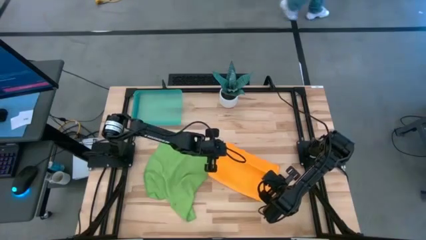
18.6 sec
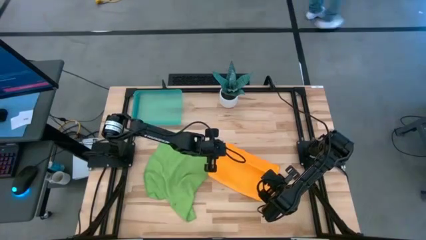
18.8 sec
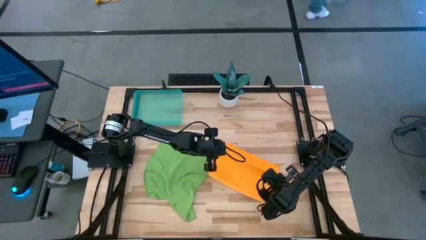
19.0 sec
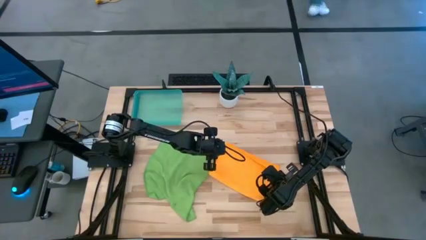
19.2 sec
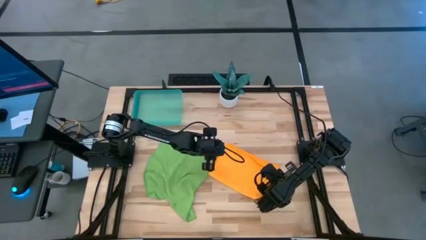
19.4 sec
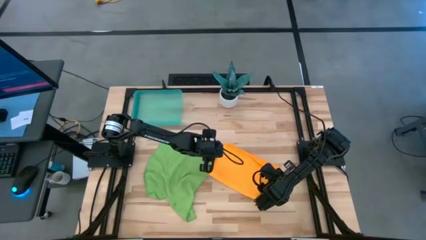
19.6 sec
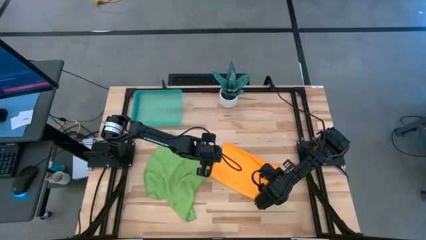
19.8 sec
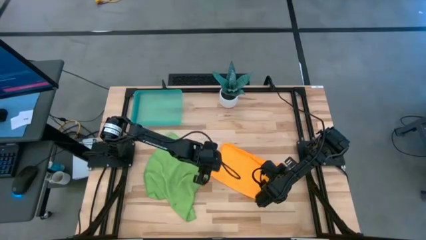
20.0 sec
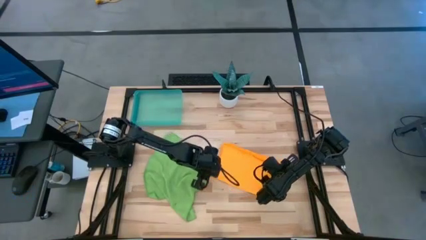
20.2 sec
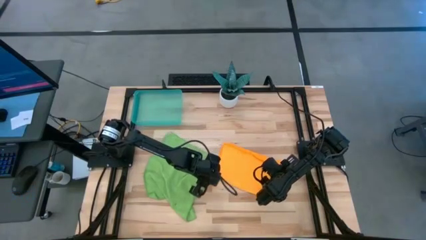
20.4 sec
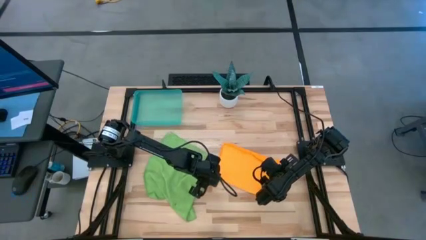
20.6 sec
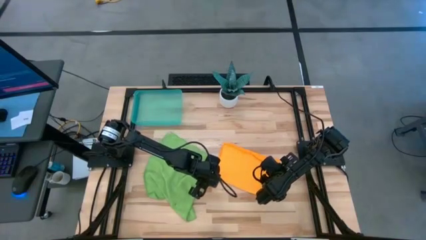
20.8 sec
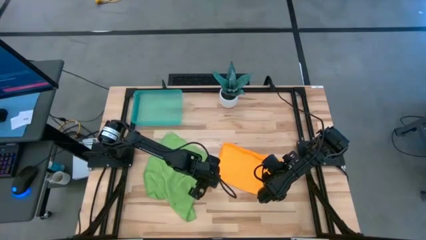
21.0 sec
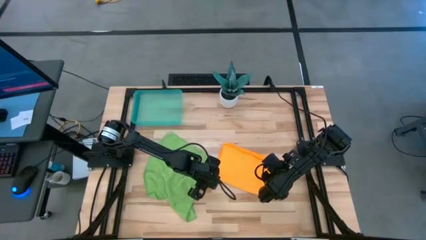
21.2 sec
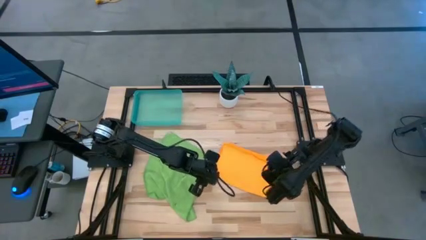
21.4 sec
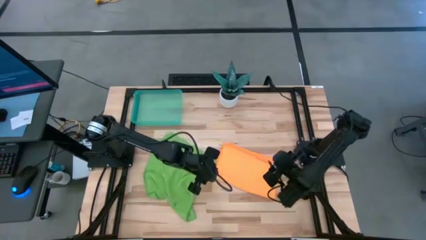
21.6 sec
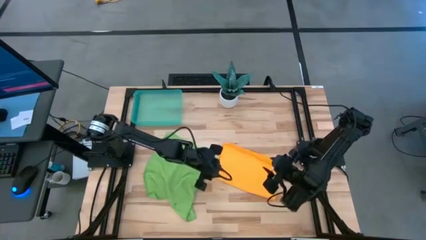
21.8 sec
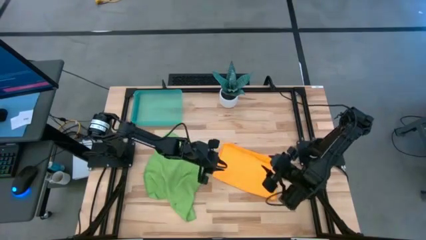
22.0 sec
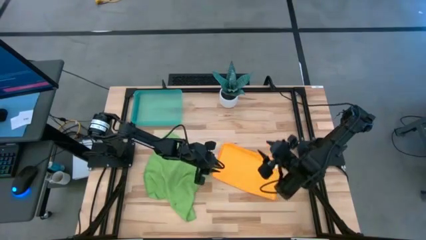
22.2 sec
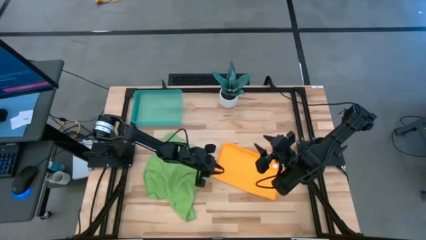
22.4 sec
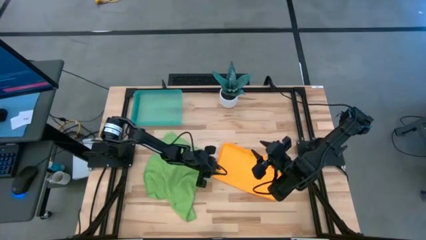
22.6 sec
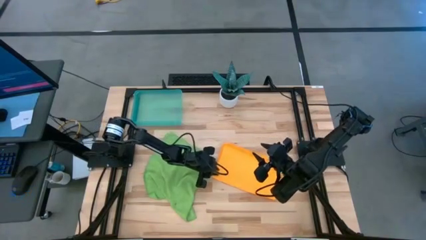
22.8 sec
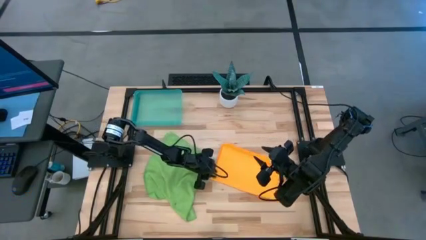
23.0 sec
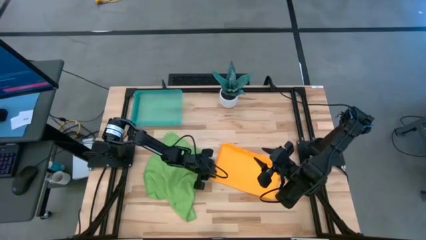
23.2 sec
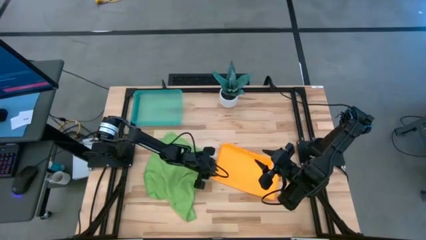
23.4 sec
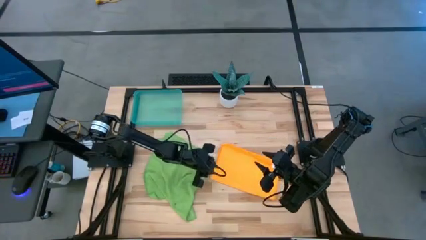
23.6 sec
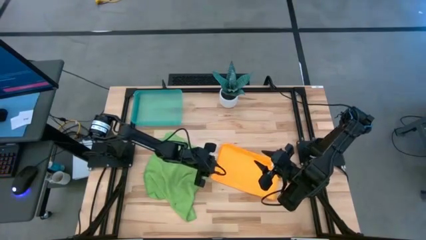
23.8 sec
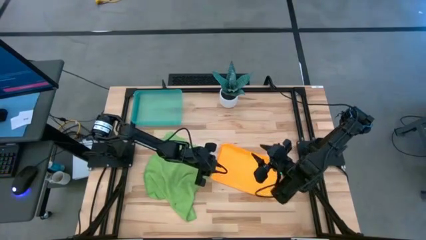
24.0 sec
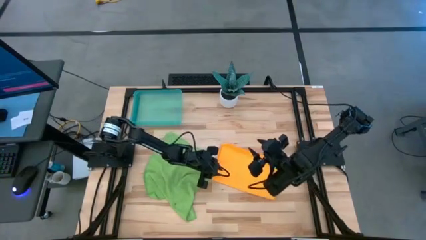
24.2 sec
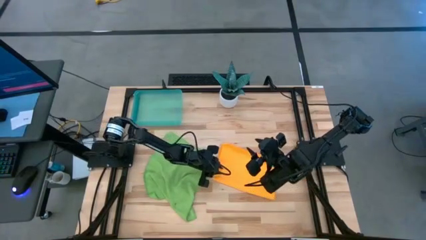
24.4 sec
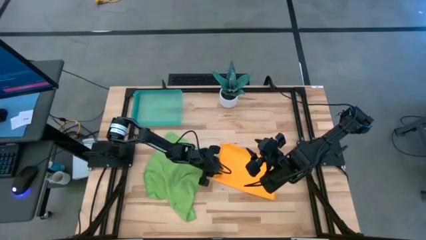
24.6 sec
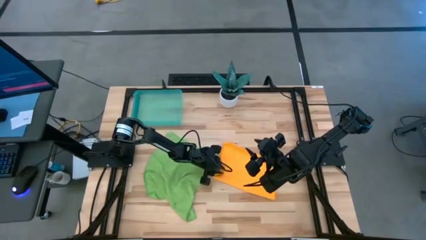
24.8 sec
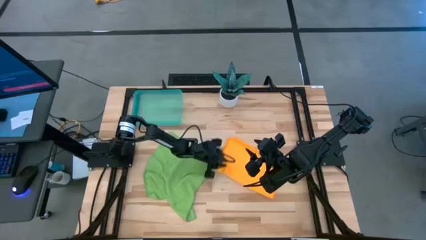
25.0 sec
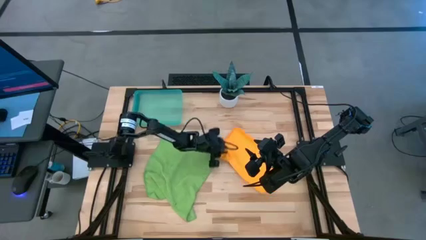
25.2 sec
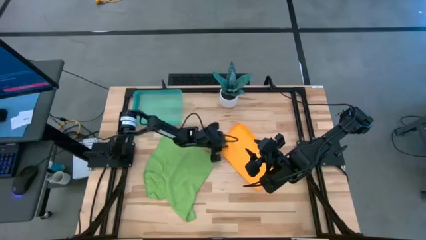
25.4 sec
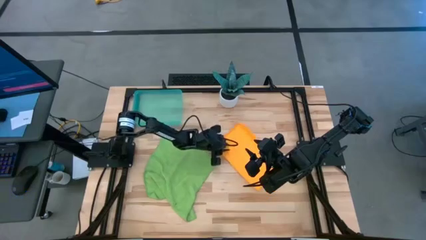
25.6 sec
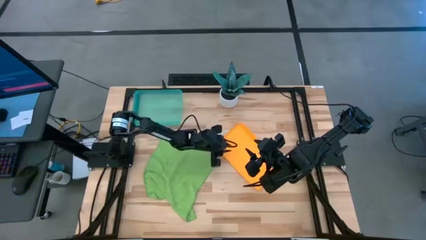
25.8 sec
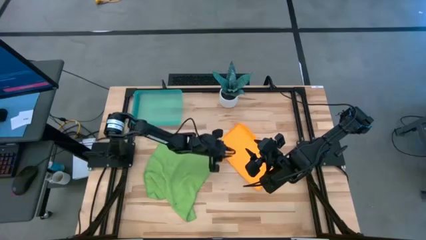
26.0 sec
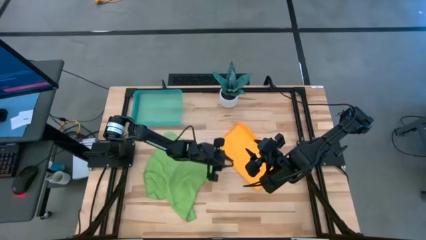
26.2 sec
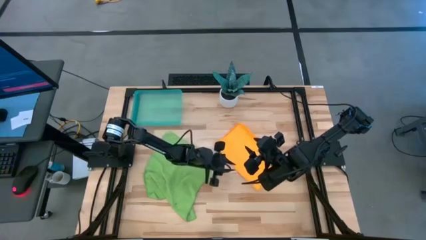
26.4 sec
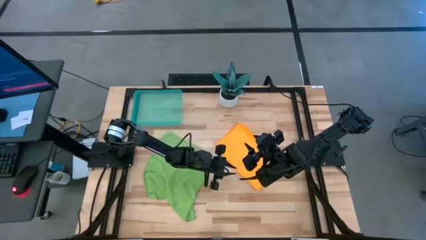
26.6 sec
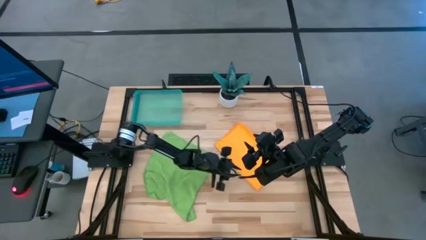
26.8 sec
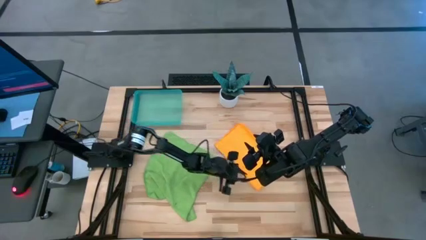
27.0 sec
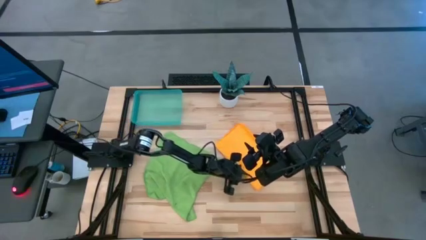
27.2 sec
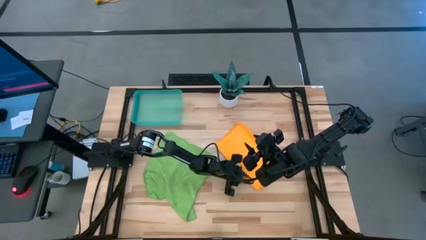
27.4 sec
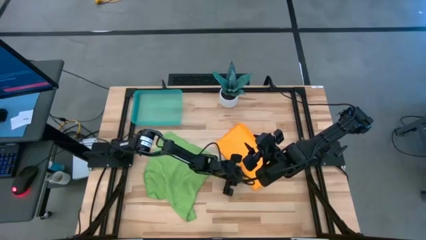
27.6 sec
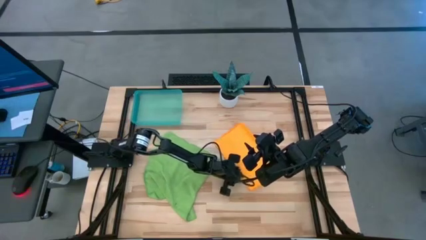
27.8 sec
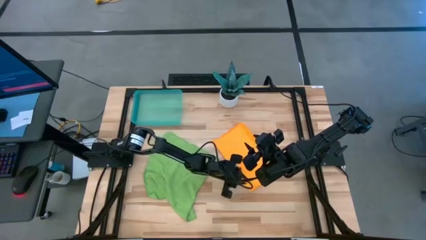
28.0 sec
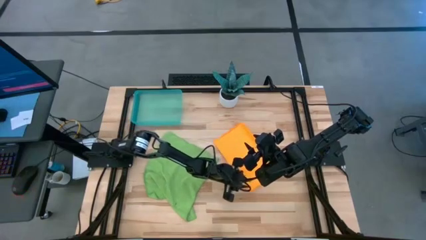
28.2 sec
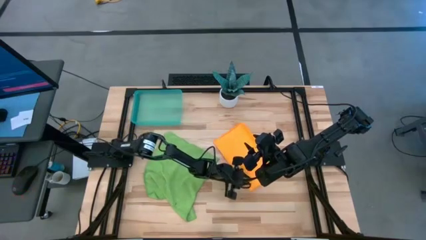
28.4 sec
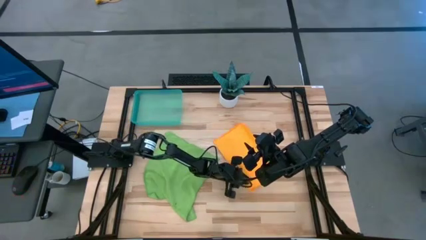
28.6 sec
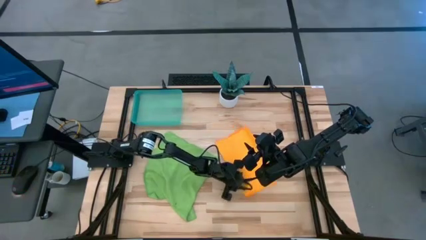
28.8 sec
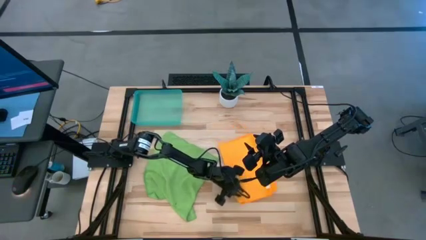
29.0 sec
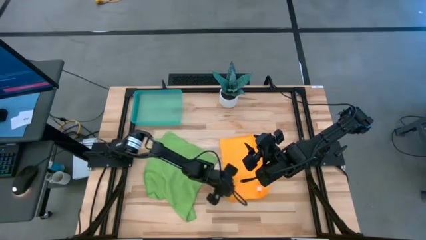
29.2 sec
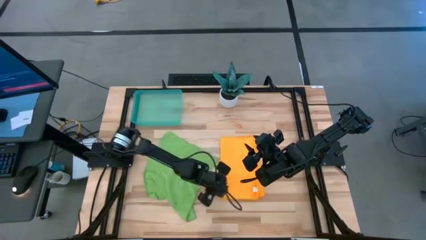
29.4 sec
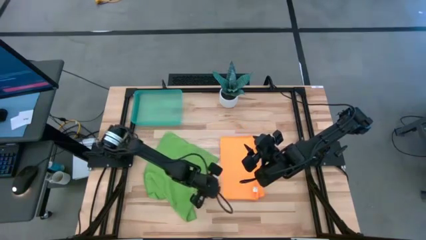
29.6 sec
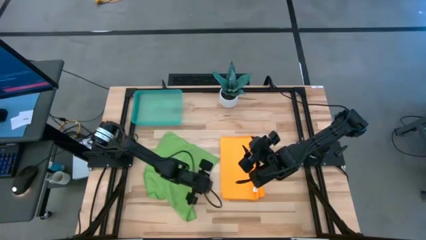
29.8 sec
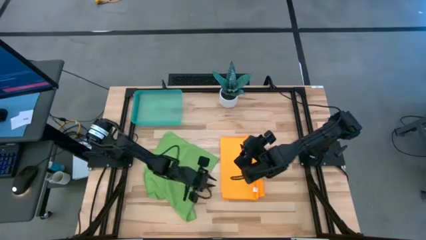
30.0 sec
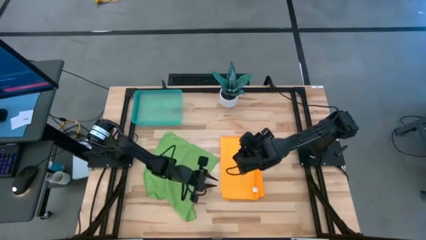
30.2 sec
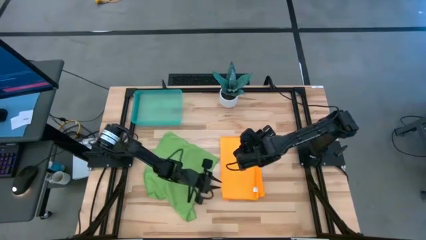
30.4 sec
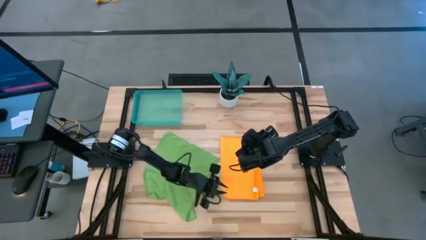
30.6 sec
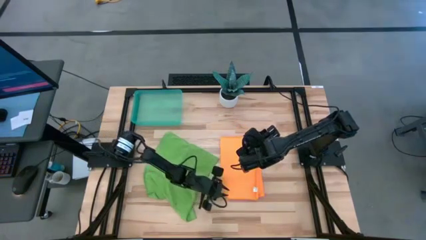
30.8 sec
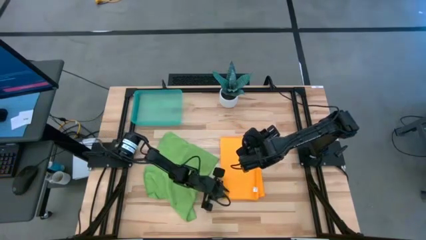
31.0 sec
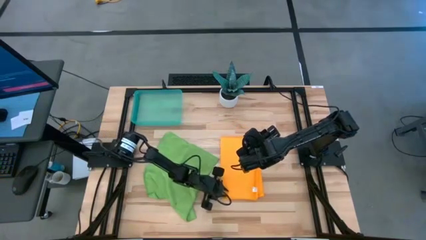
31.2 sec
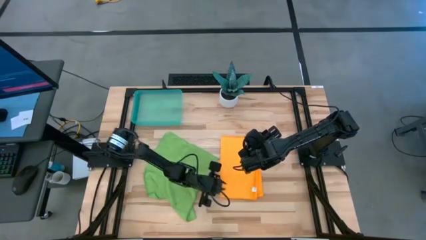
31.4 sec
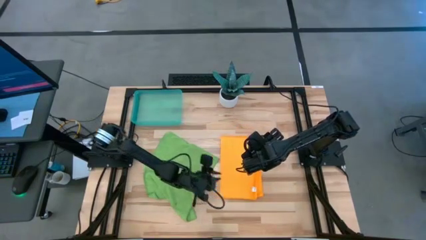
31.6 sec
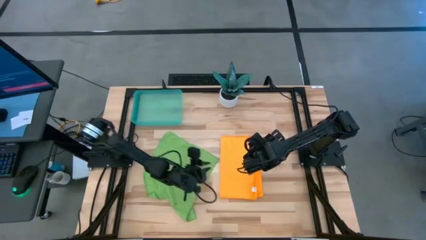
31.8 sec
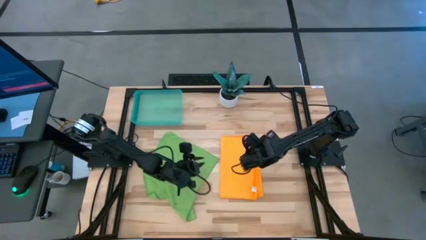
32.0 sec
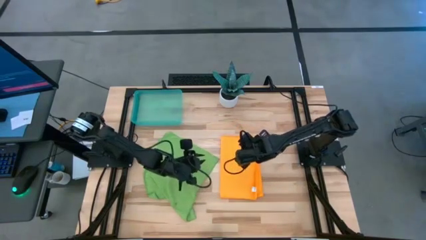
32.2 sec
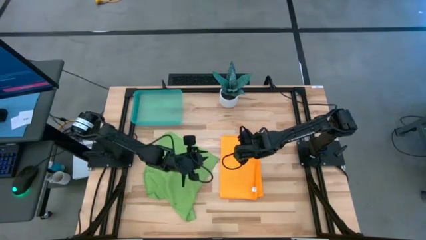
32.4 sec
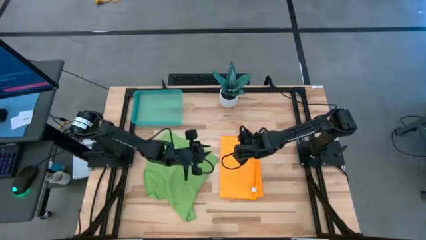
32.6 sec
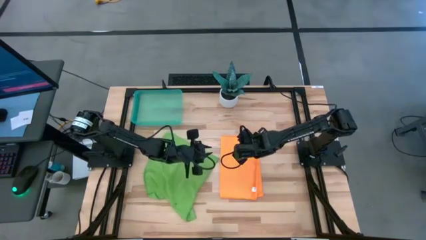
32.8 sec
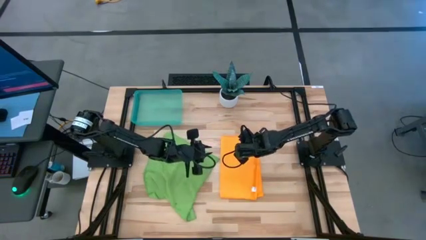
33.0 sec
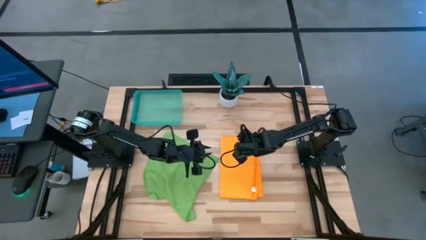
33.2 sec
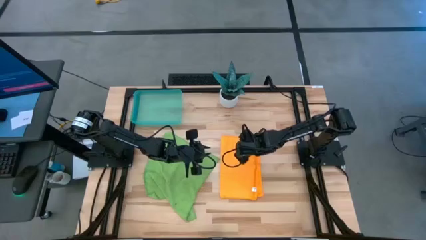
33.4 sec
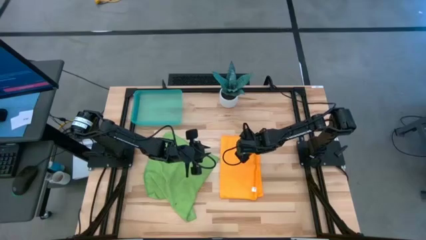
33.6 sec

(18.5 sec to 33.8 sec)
Task: Roll microfiber towels into tight, uniform cylinder then place into a basket
Fold the yellow microfiber cloth

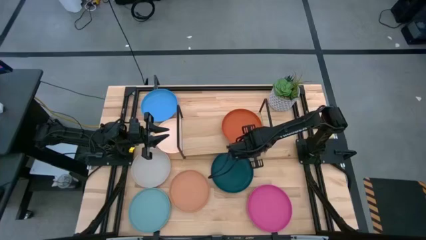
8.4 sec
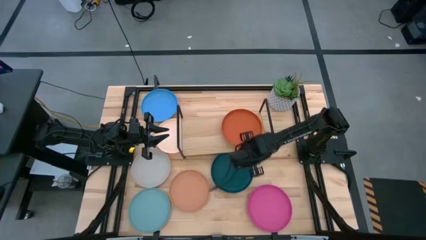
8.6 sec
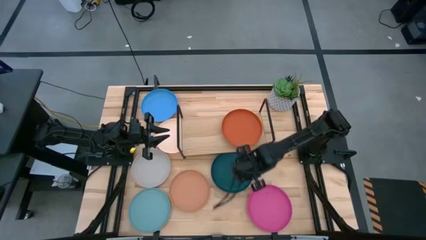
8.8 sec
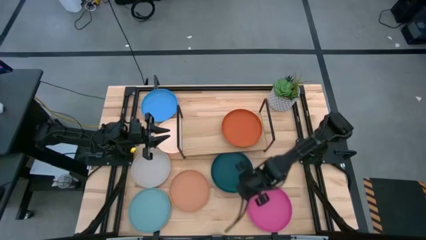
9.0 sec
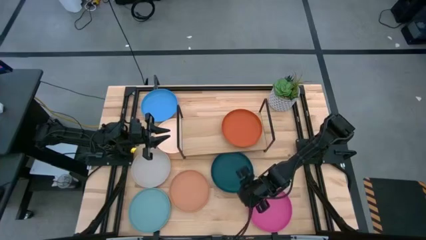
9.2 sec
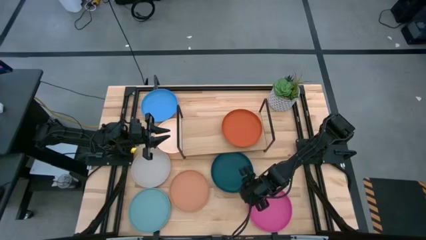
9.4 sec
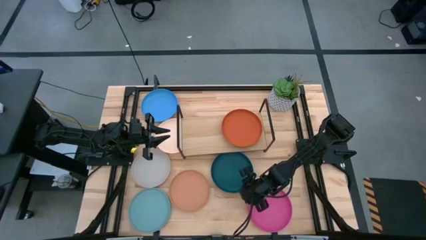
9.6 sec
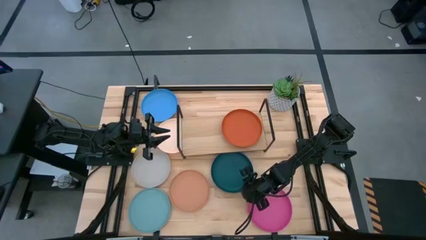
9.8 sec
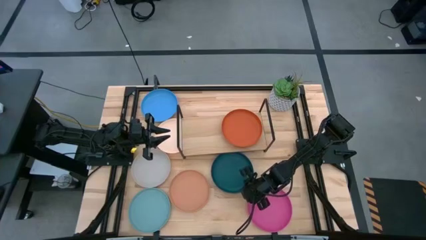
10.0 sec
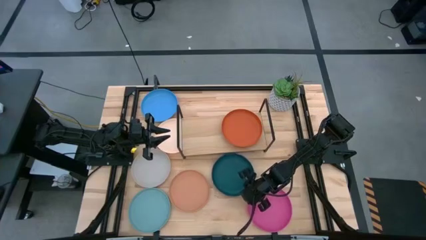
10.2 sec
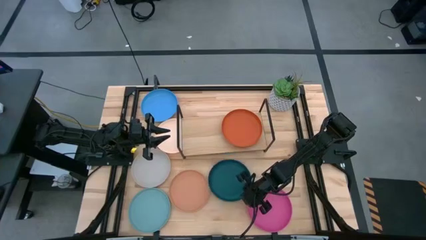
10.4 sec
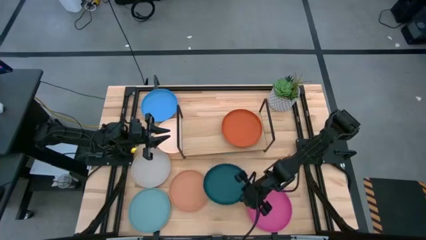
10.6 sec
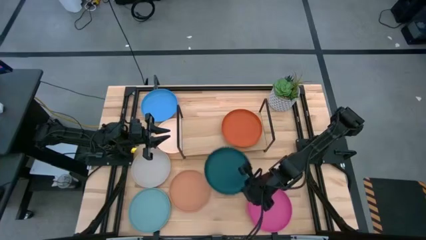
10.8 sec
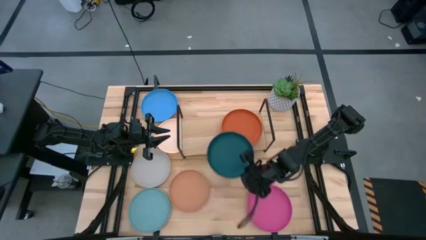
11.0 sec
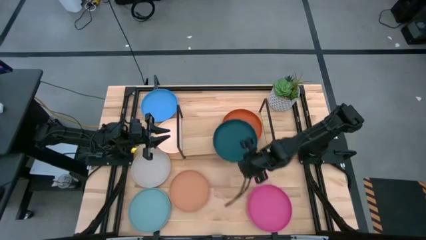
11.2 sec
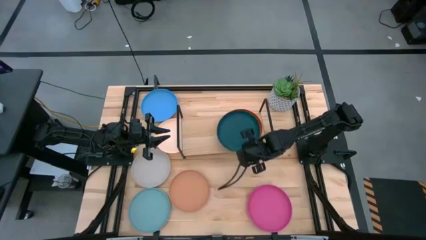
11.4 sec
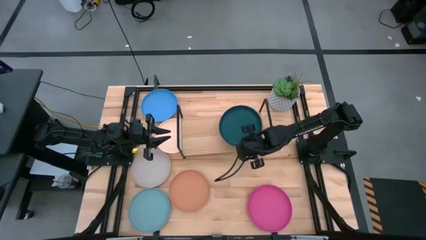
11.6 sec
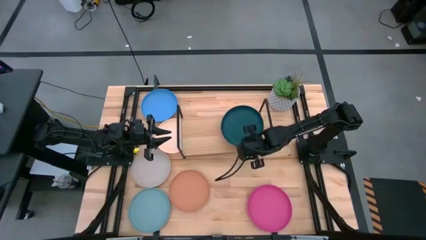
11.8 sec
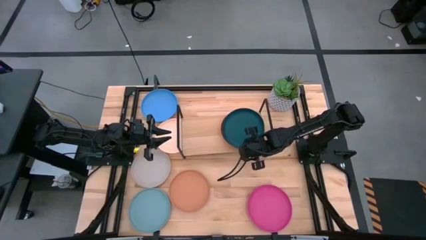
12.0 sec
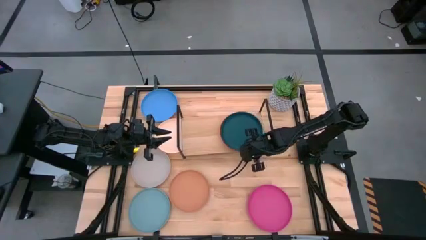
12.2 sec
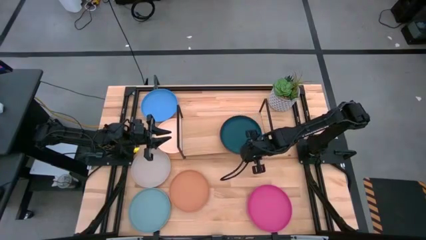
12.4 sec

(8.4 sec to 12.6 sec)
Task: Place and stack plates onto a shelf
Stack the dark green plate on top of the orange plate on the shelf
